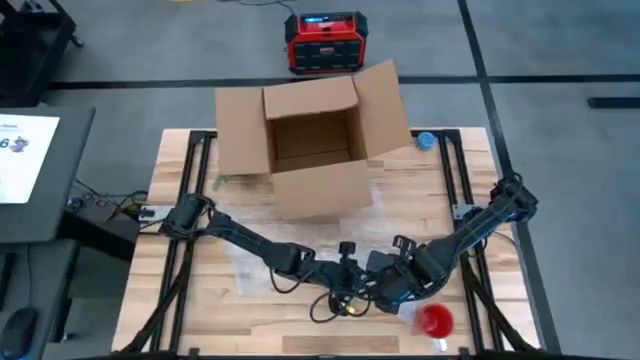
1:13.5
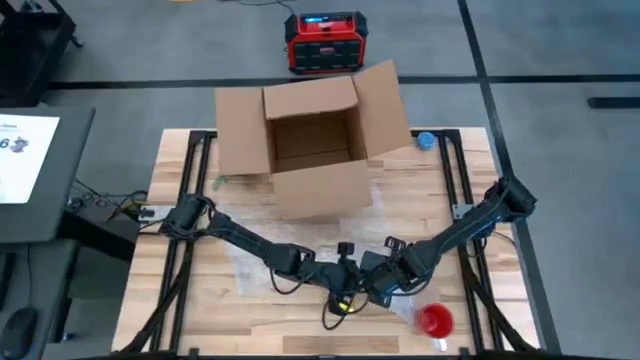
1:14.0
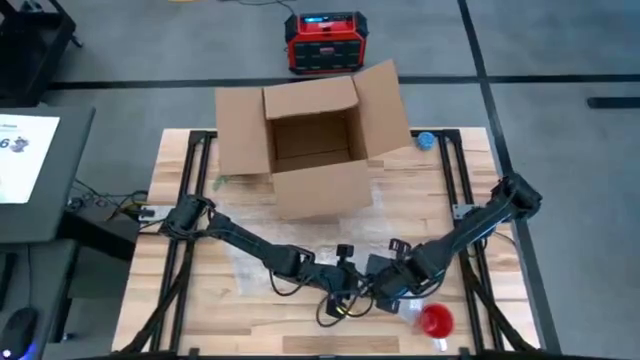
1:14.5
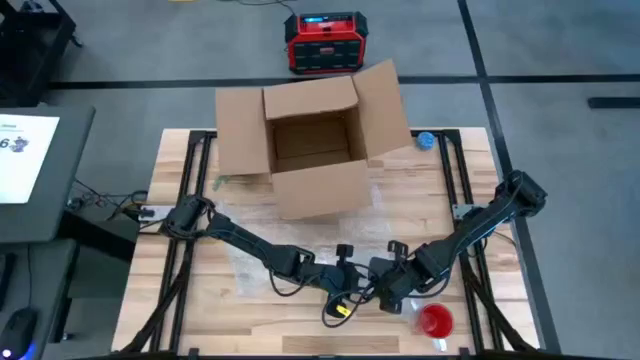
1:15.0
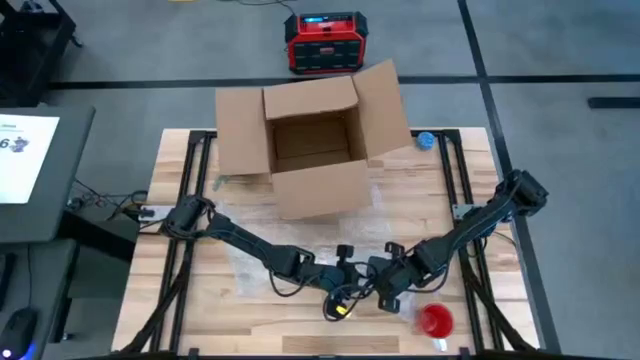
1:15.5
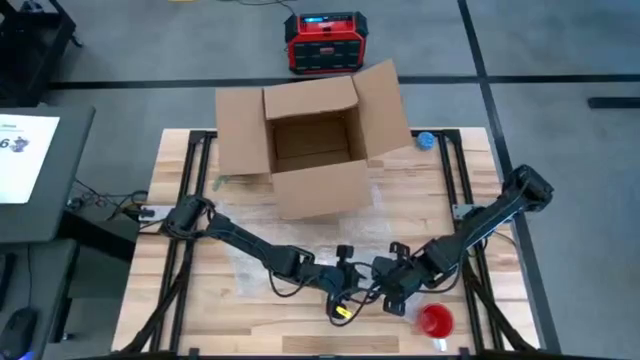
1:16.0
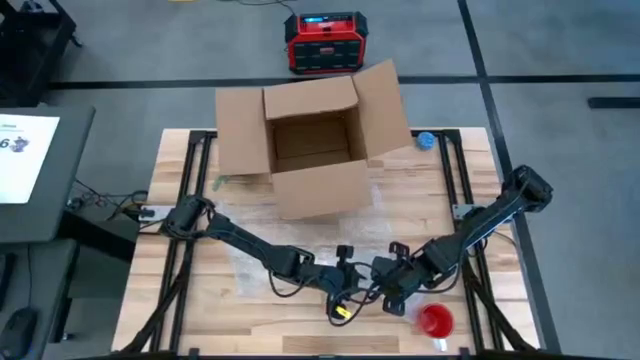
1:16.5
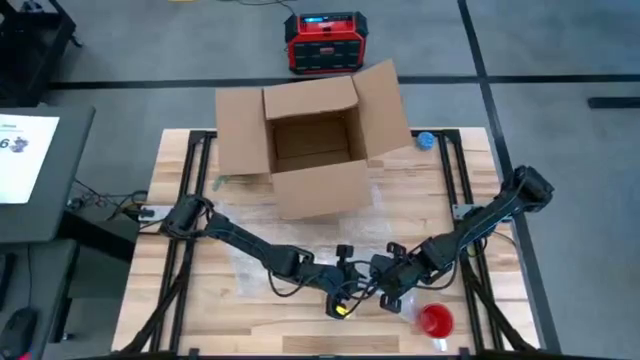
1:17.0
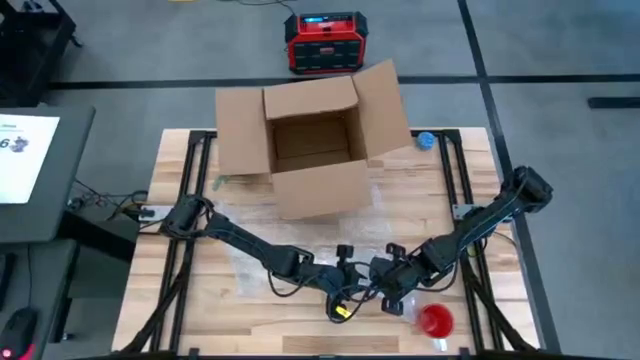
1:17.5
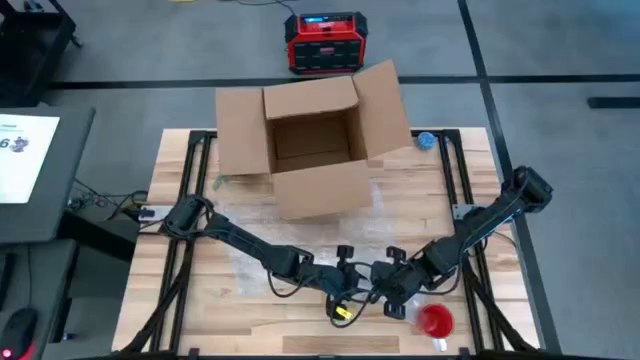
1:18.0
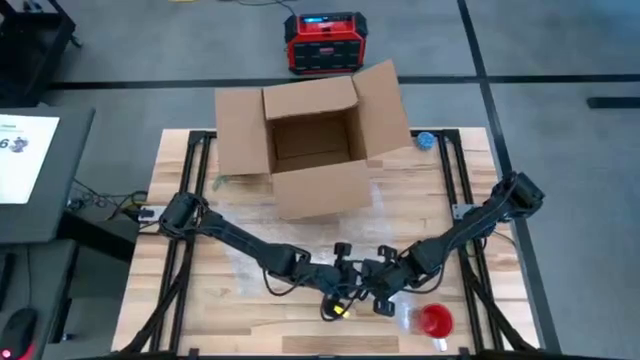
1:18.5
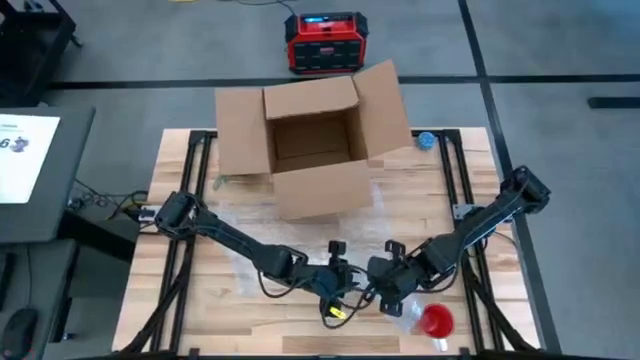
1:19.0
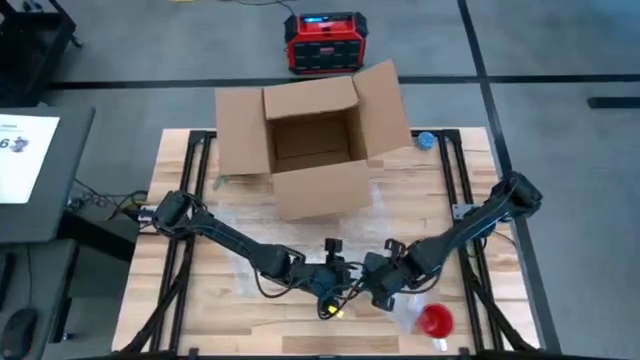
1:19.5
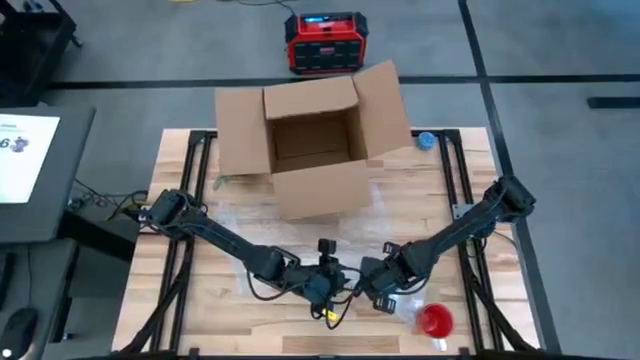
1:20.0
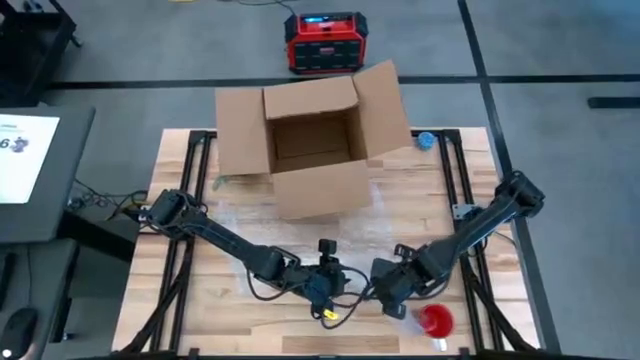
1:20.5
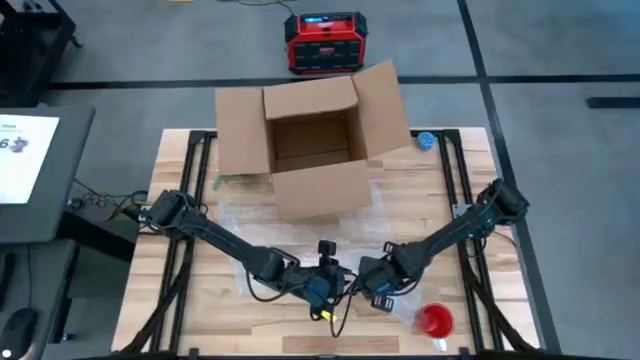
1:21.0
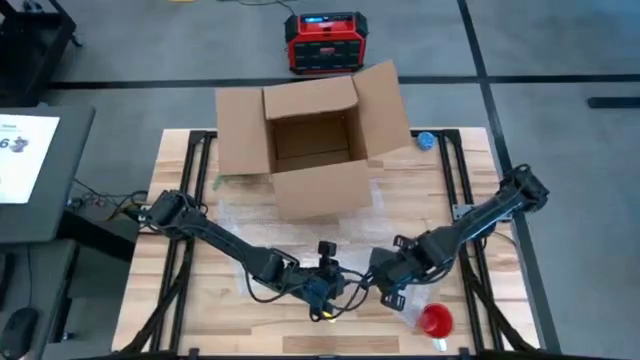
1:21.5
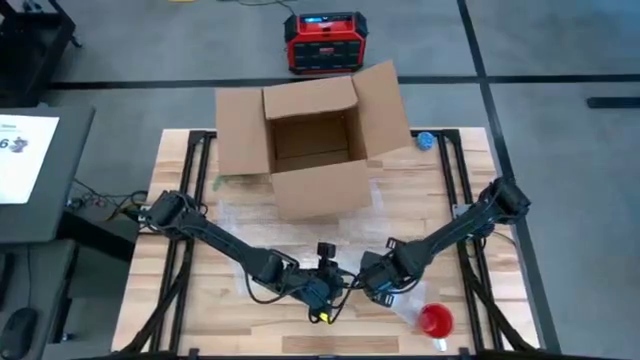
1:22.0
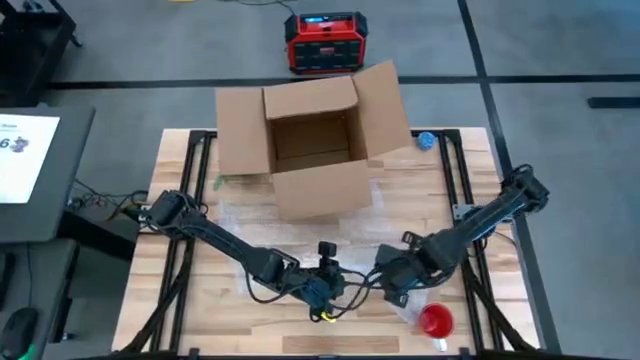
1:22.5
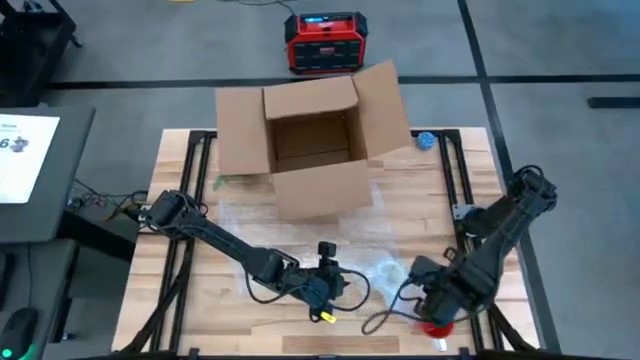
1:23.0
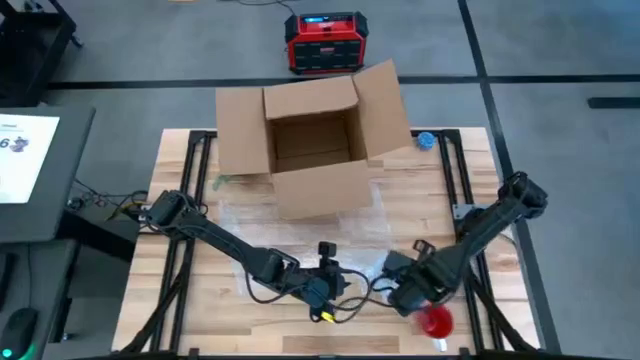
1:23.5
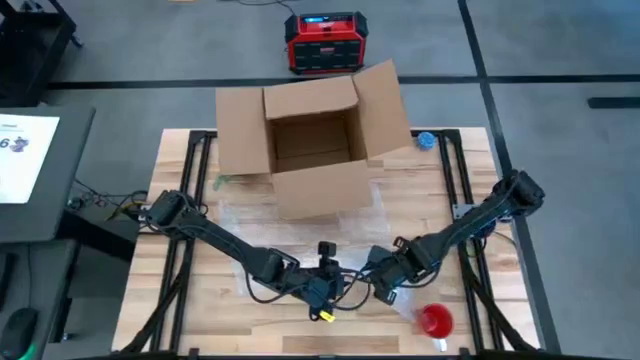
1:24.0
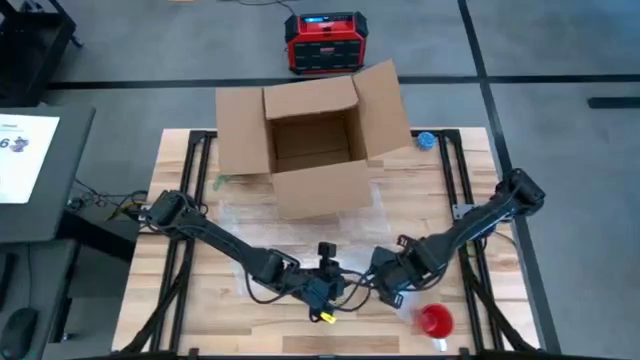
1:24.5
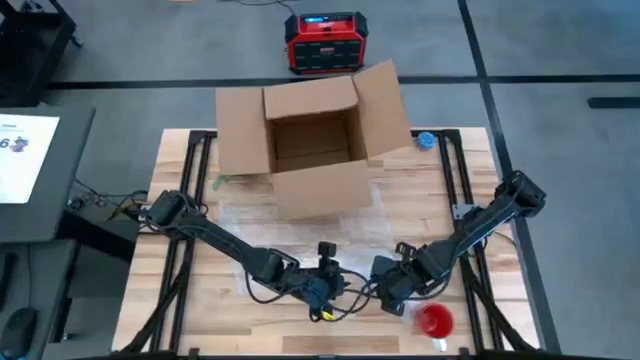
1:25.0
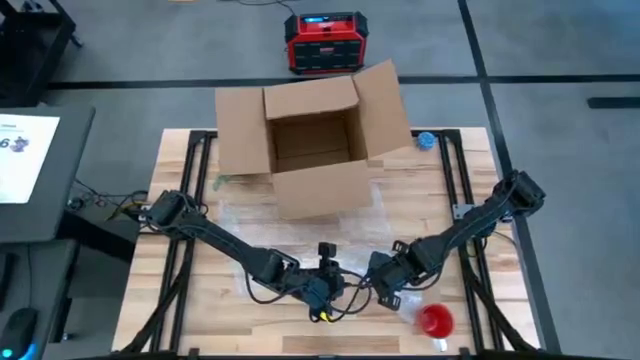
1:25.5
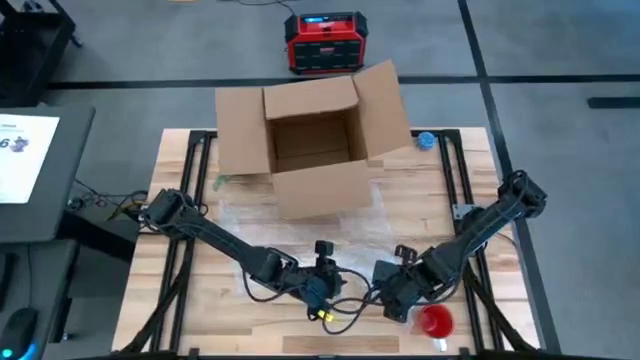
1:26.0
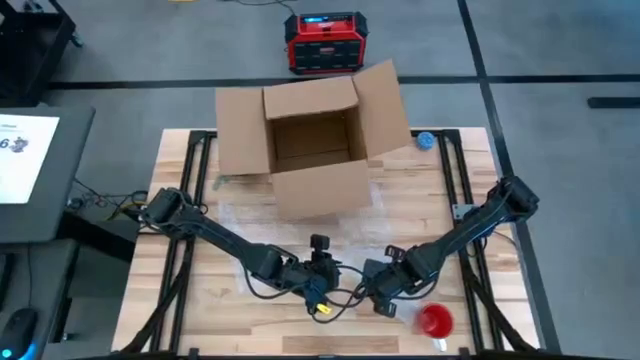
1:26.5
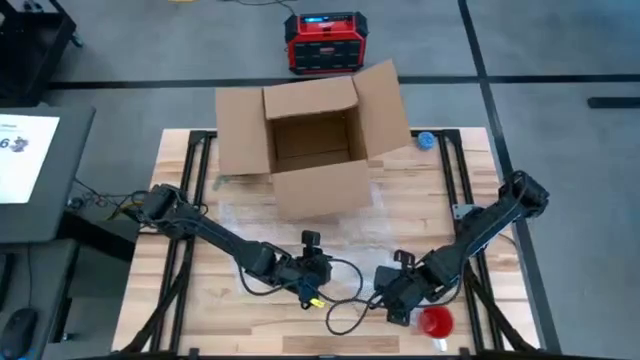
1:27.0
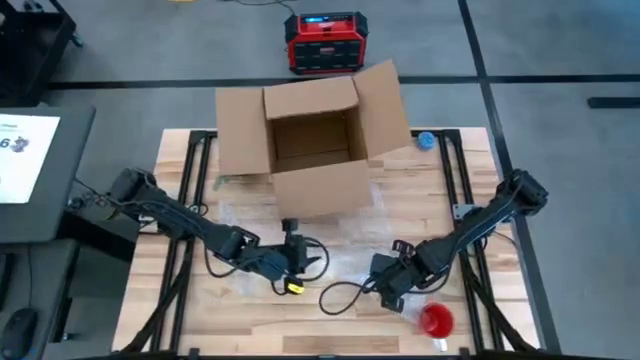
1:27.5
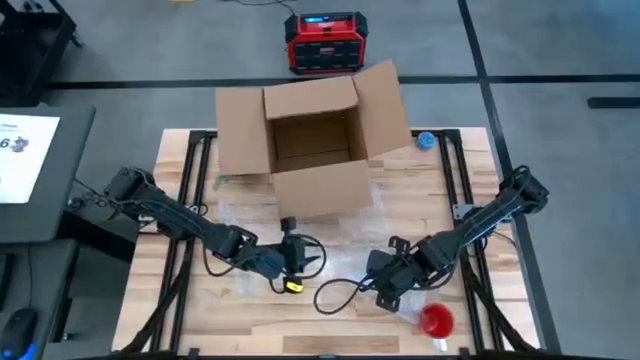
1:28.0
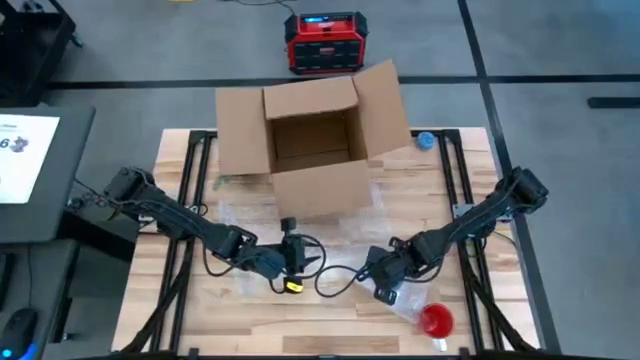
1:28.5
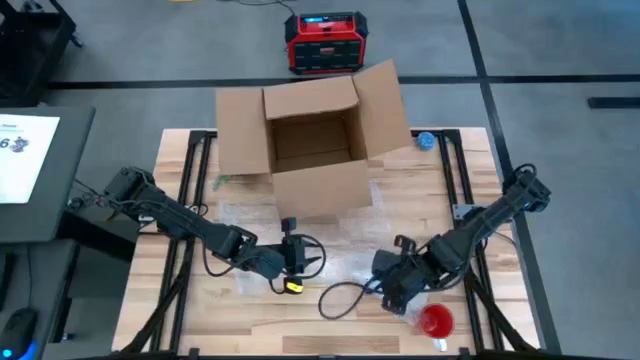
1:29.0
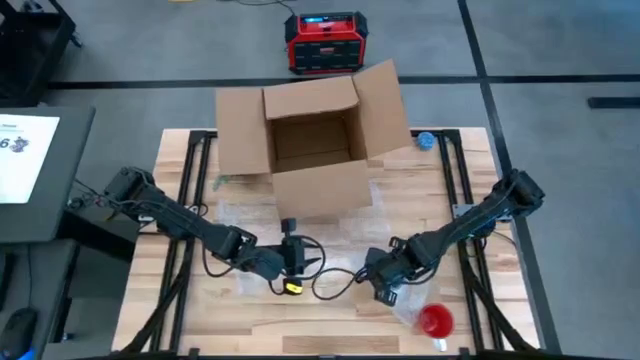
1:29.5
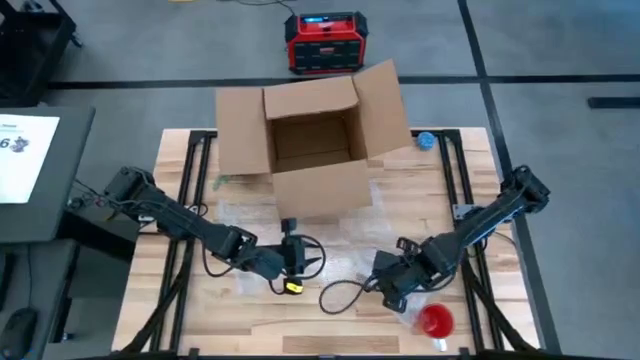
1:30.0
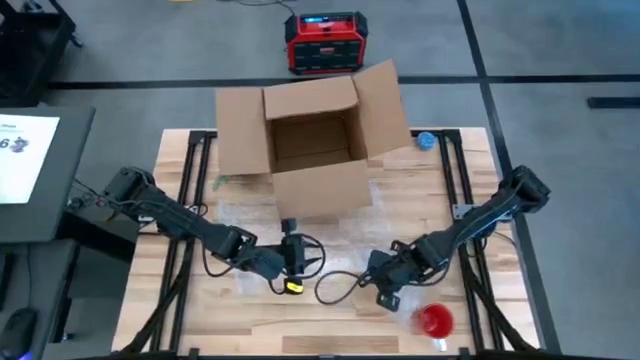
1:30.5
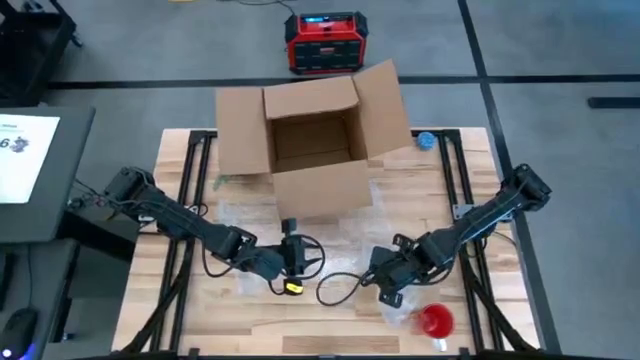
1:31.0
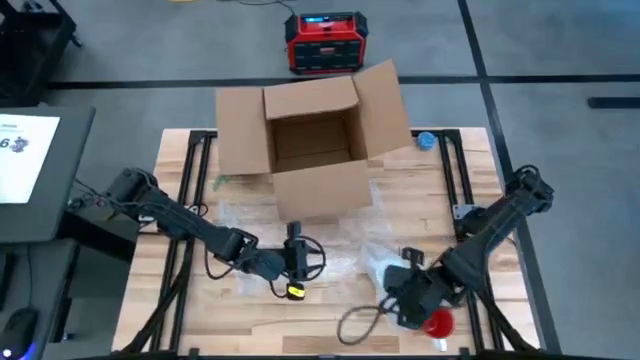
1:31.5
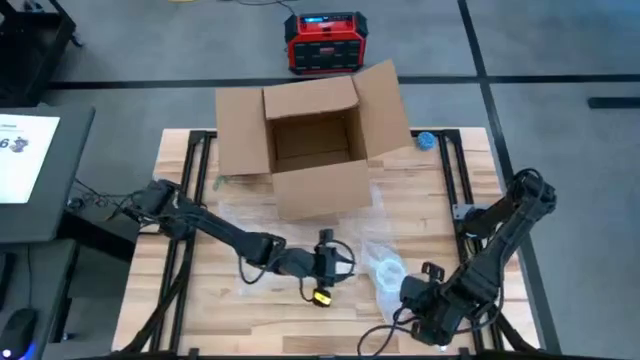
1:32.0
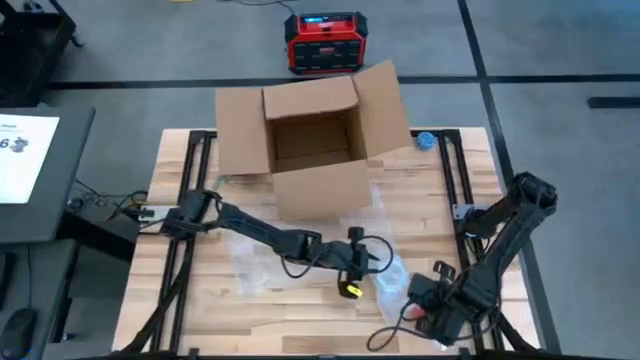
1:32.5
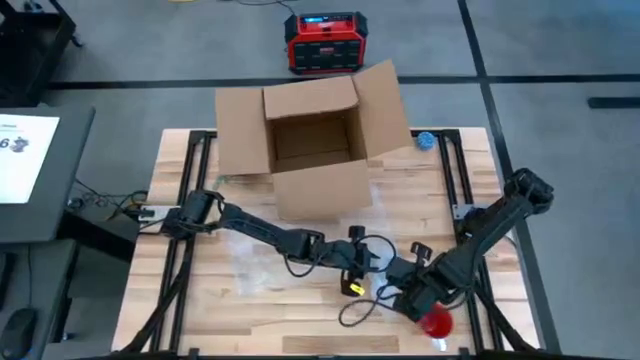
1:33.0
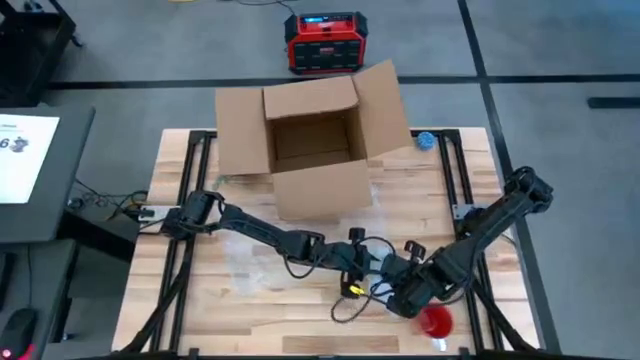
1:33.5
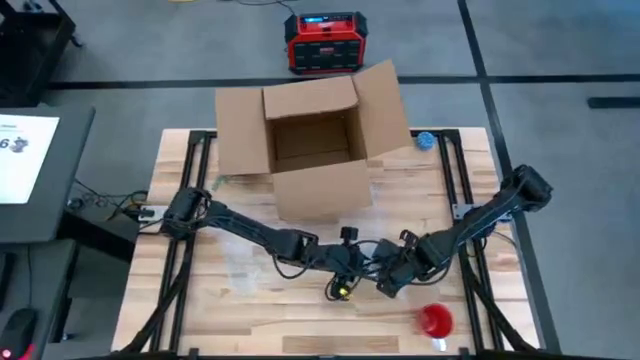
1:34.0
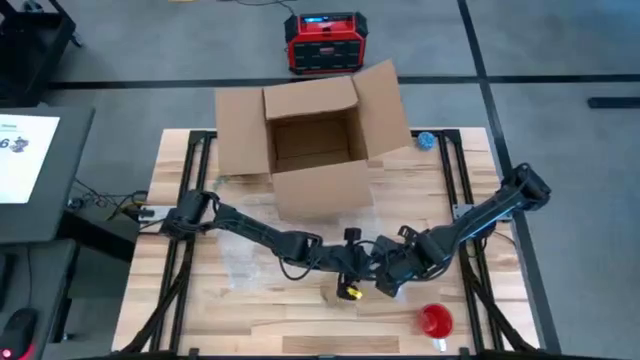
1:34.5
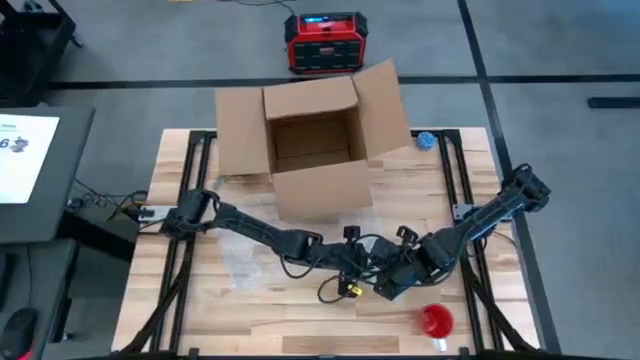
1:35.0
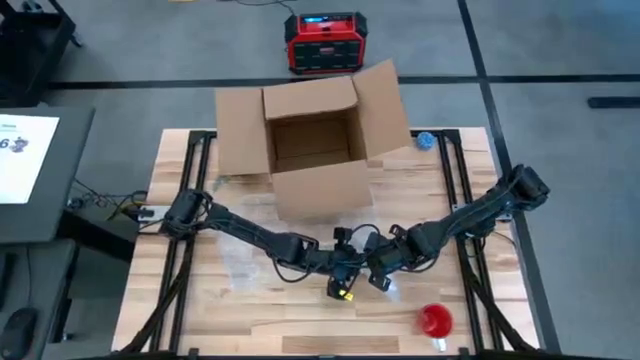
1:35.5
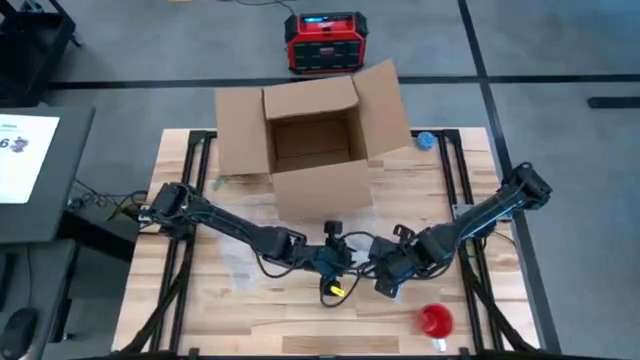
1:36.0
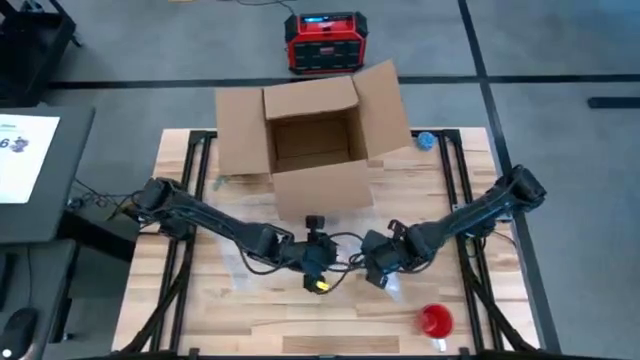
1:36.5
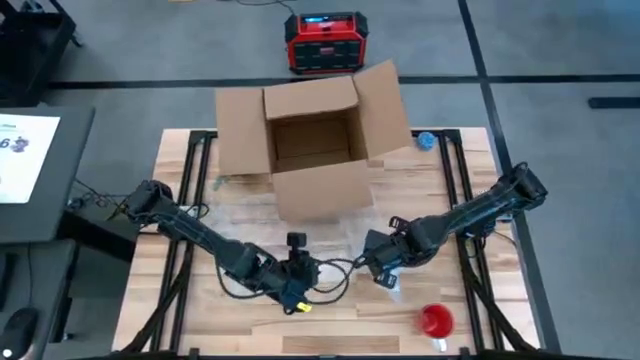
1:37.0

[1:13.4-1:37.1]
Task: wrap mug
Wrap the green patterned mug into the bubble wrap
